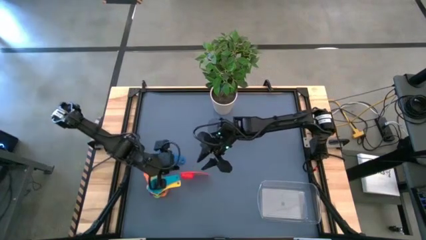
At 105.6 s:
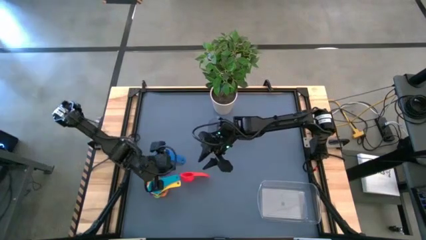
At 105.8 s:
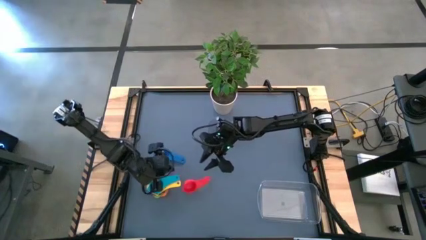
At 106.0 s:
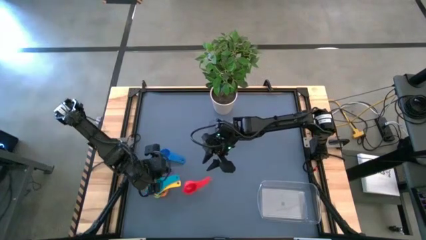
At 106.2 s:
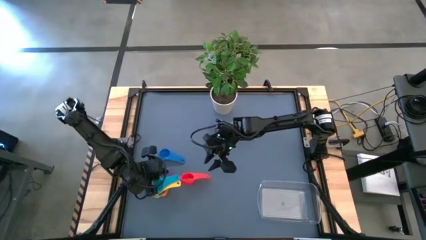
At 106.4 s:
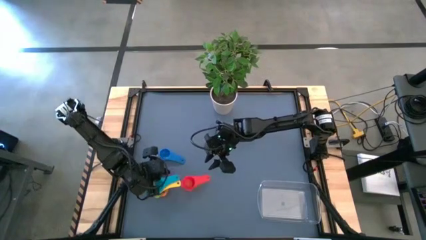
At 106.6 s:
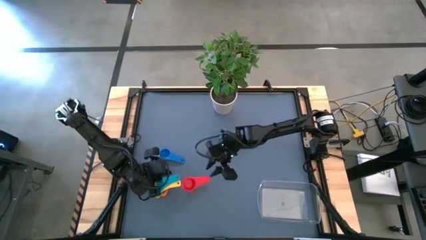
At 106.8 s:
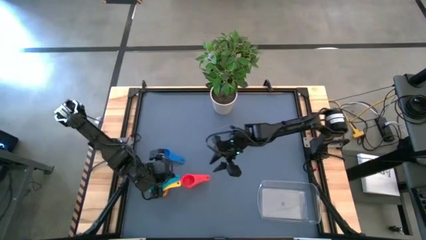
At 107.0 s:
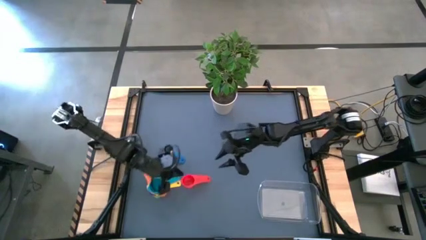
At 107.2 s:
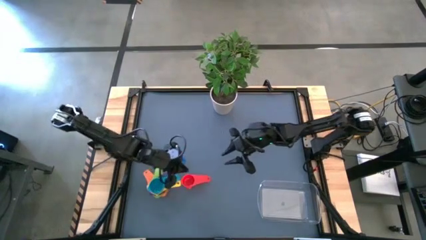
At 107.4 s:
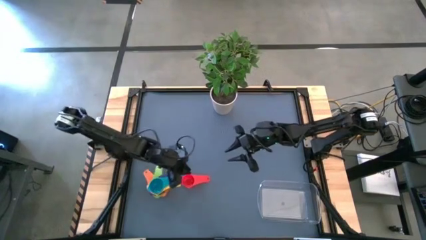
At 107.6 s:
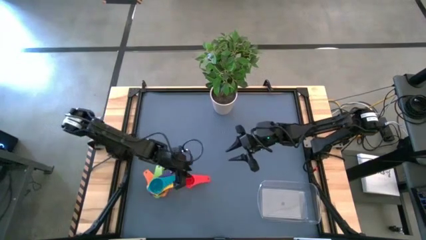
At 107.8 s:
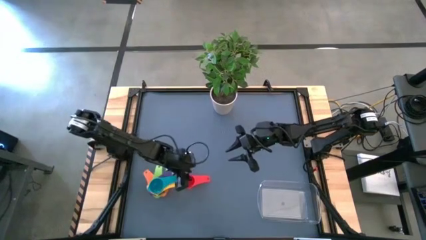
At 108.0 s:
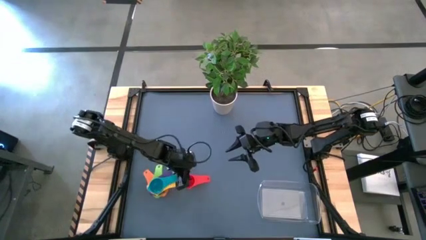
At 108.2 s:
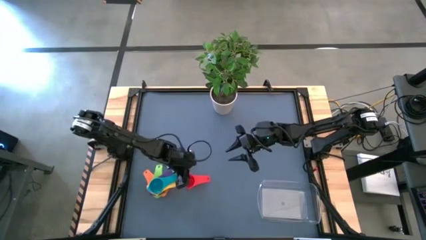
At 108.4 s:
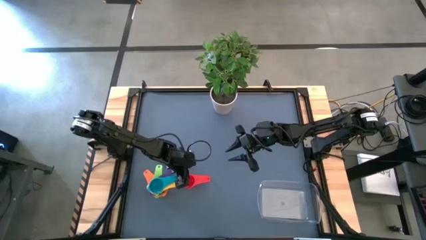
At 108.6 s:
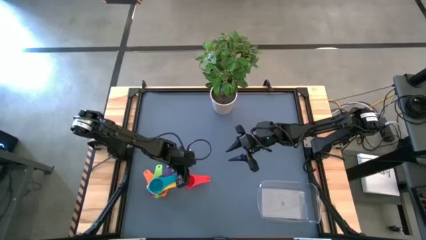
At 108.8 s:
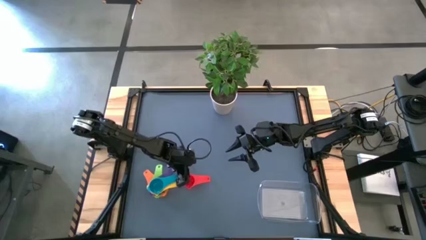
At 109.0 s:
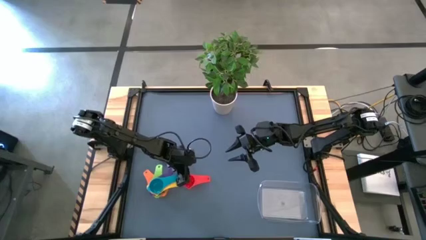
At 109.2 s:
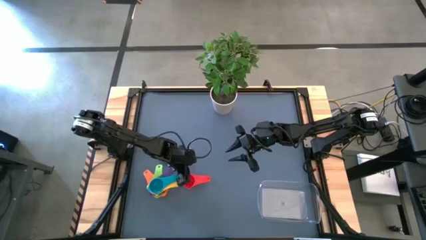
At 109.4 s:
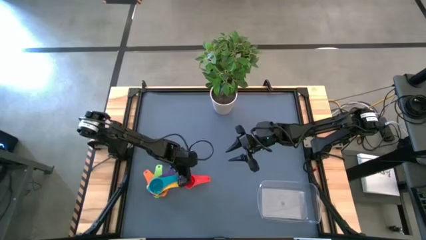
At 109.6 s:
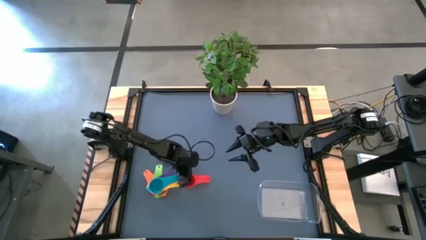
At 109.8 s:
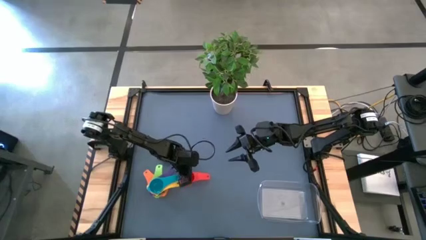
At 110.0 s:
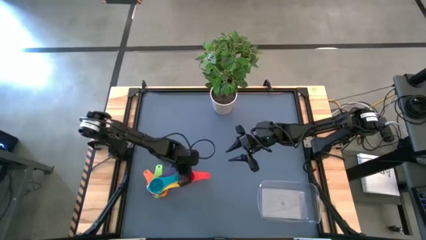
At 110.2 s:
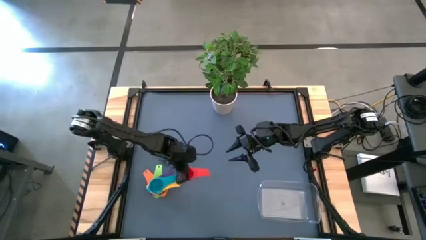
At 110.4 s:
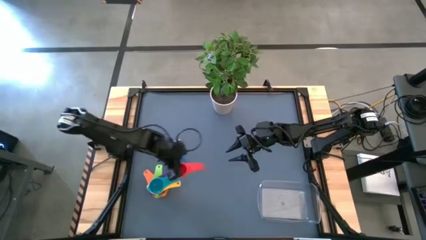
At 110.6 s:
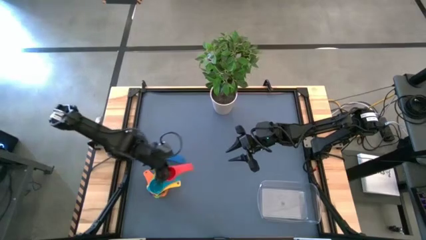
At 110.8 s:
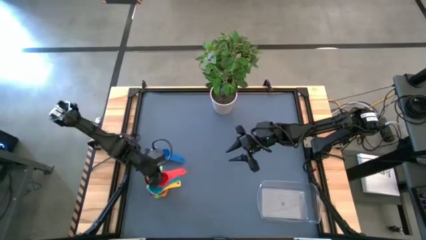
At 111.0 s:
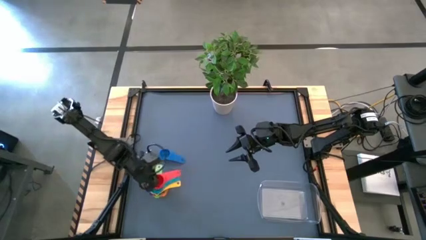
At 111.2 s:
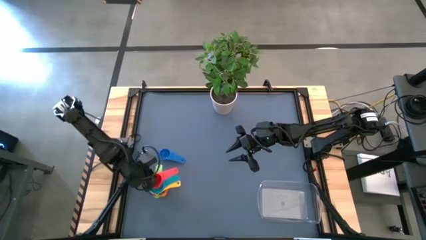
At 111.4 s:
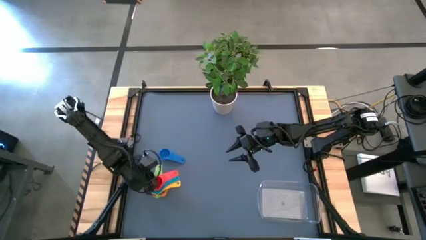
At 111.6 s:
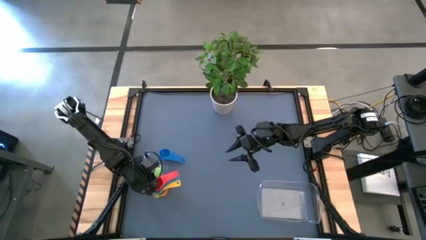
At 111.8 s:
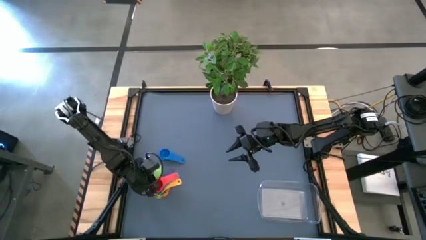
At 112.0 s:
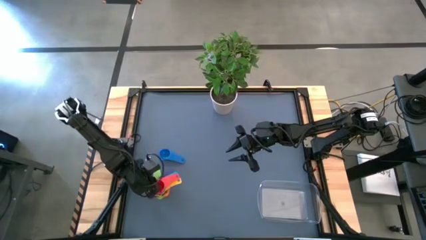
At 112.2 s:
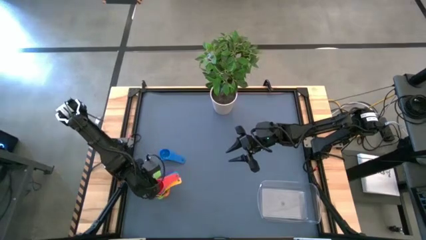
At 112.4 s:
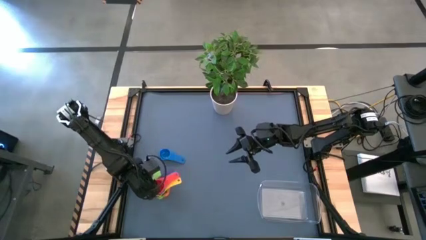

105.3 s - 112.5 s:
Task: Nest measuring cups in basket
Stack the red measuring cup on top of the light blue measuring cup

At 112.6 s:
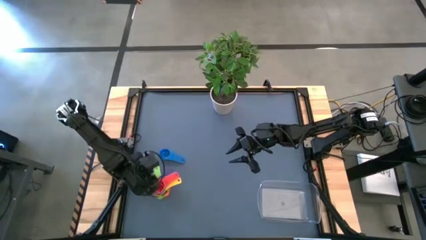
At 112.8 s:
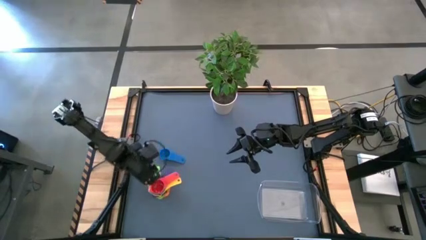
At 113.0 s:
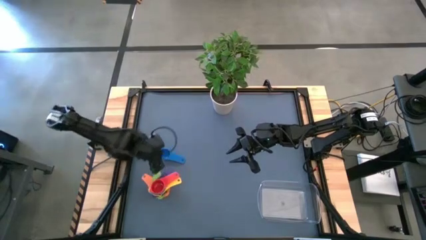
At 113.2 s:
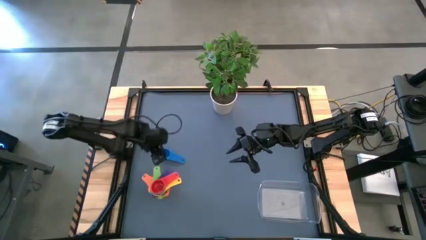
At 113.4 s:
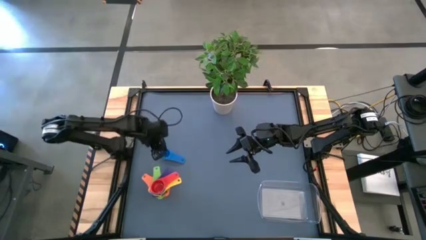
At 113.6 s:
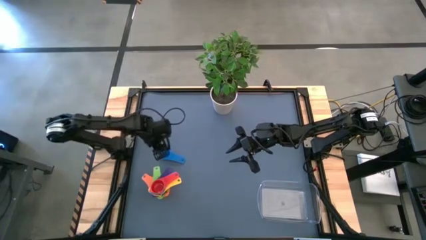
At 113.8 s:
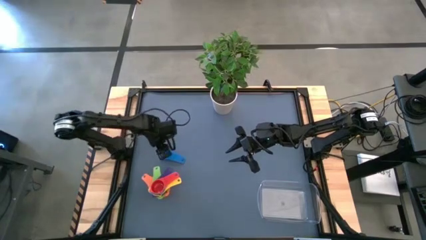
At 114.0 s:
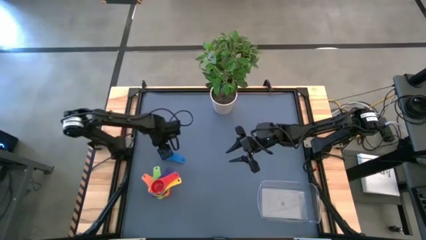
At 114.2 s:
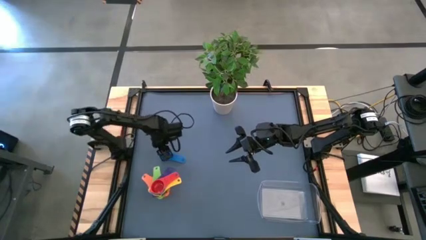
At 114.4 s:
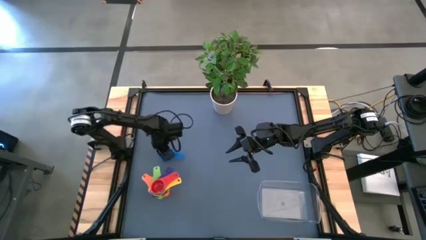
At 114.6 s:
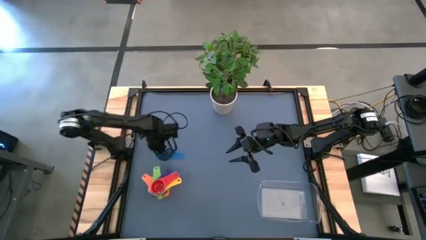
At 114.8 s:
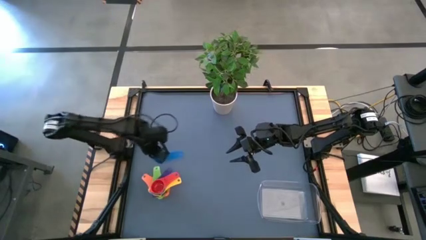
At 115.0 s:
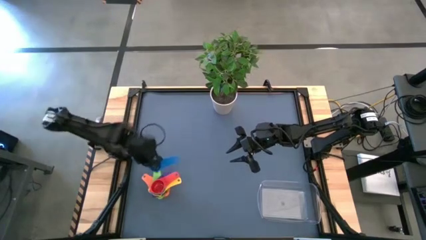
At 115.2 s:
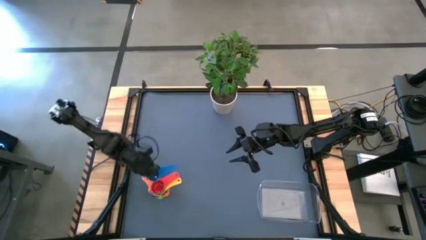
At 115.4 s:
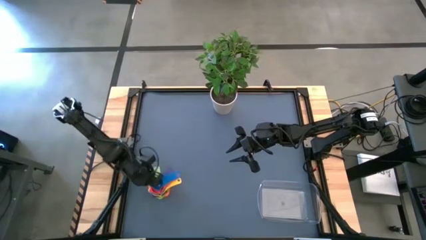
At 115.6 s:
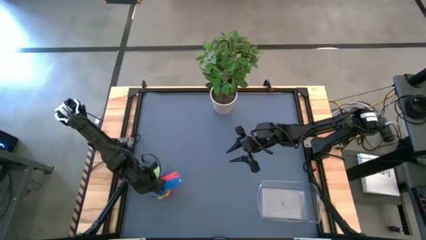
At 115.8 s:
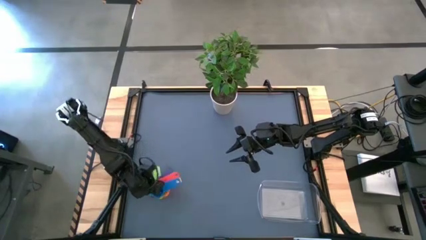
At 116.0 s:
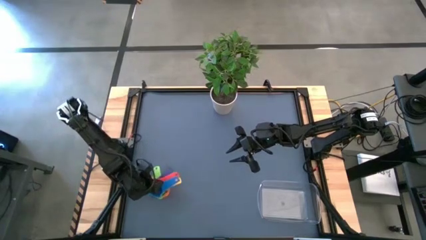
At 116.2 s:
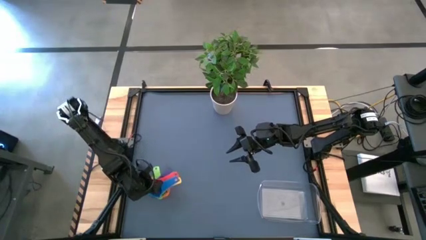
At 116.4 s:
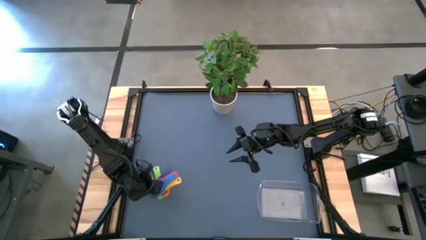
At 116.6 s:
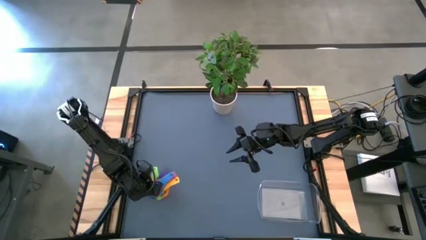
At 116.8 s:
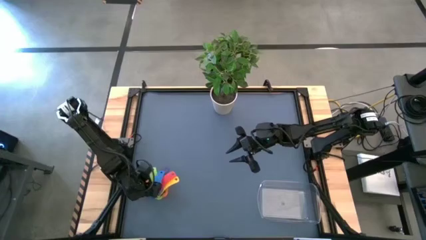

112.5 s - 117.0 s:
Stack the blue measuring cup on top of the red measuring cup
